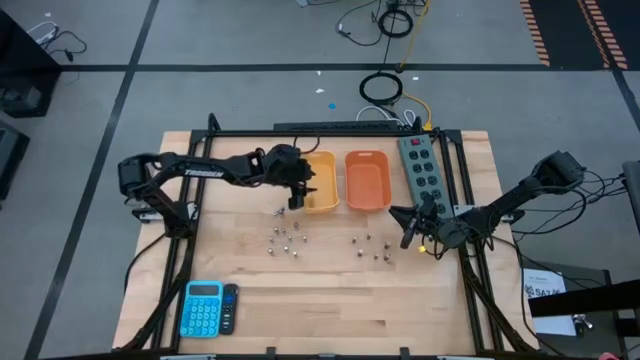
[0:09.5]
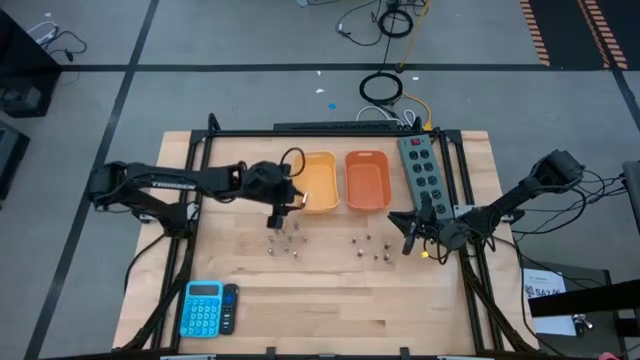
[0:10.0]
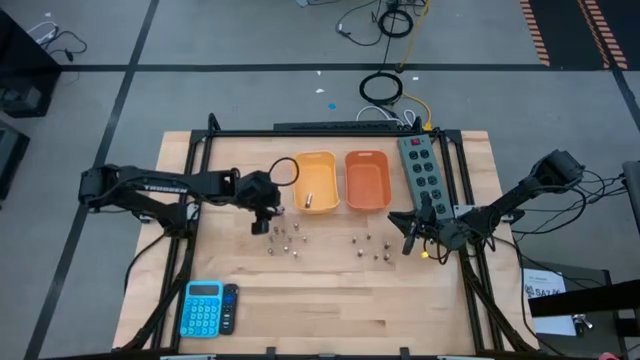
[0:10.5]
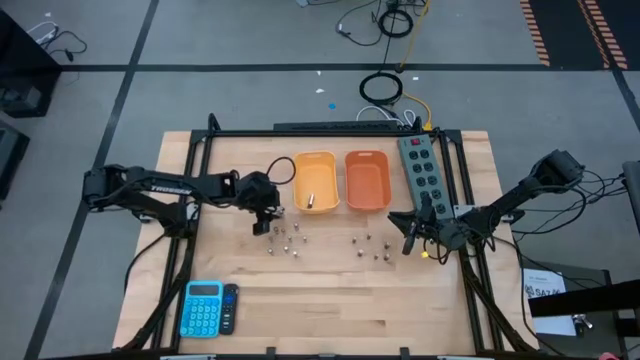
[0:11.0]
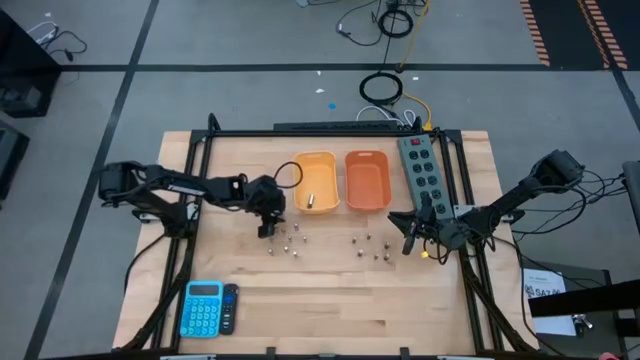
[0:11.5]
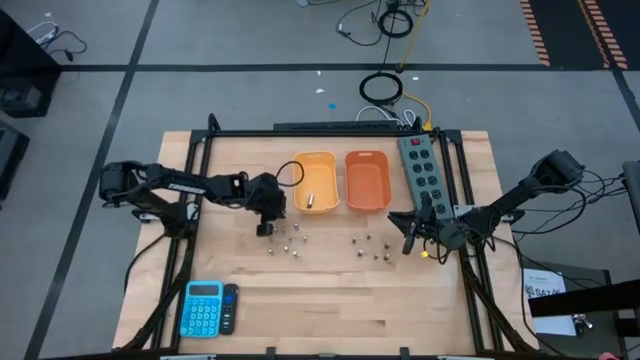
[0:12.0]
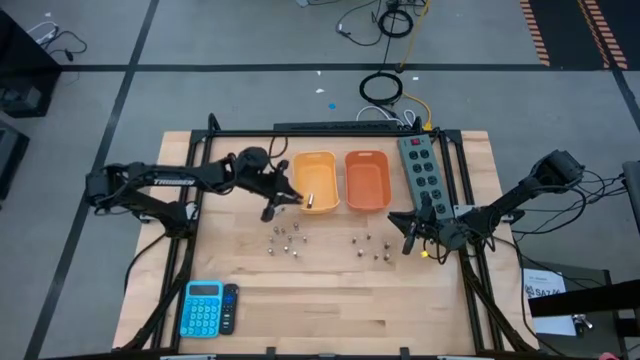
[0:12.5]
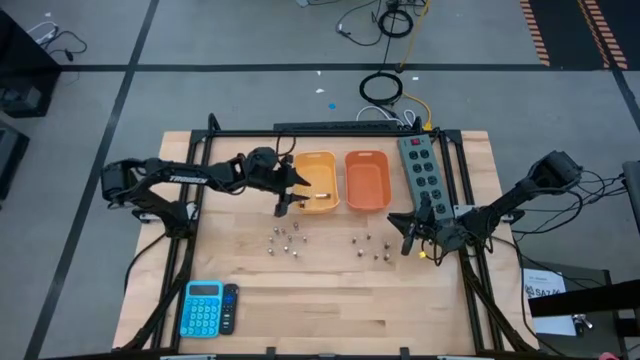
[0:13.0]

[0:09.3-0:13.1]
Task: Sort batteries
Put the silver battery into the yellow bin

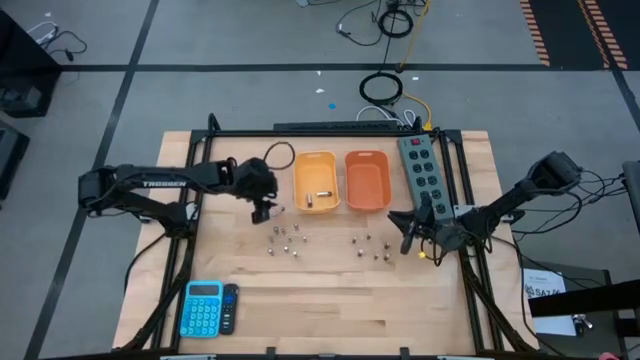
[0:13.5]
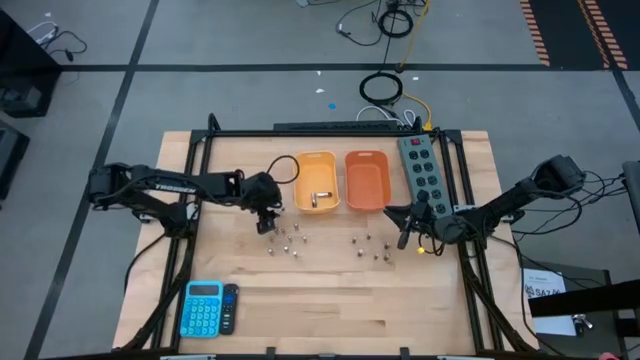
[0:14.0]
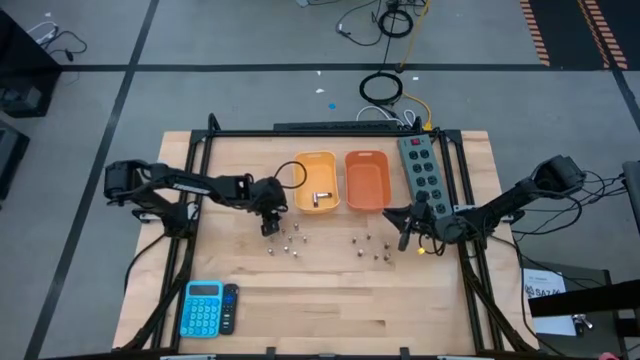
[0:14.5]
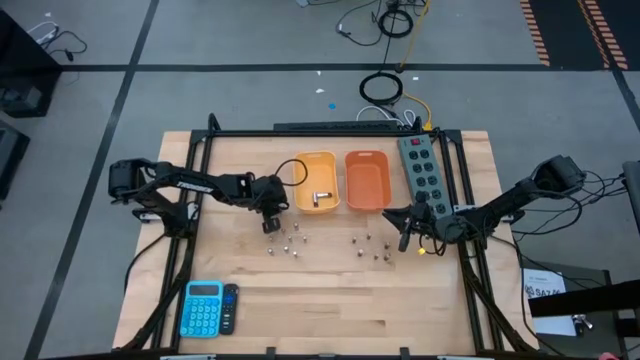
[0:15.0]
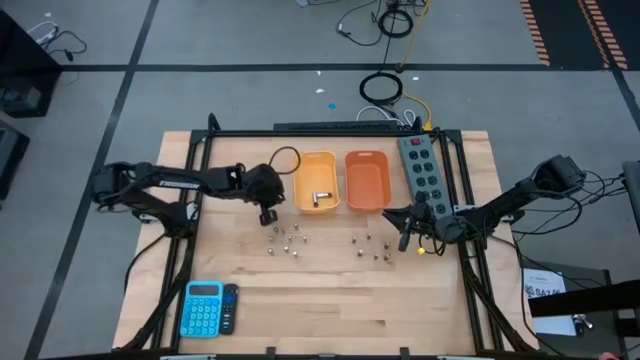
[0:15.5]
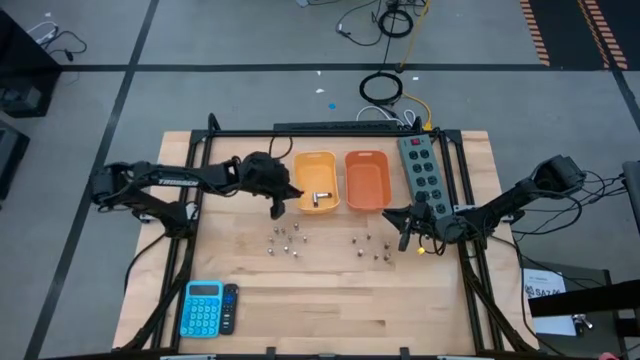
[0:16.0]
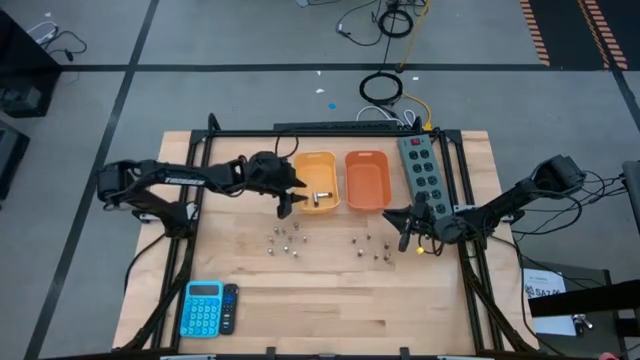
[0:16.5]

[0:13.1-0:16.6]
Put the silver battery into the yellow bin

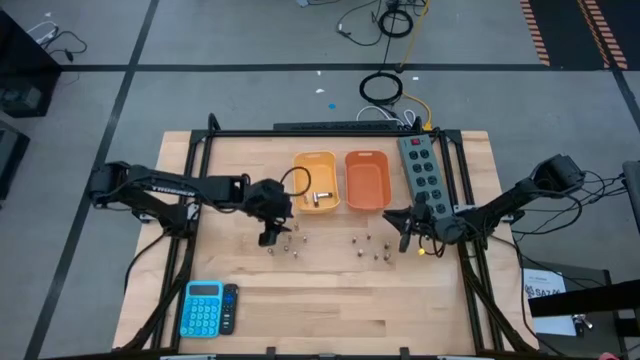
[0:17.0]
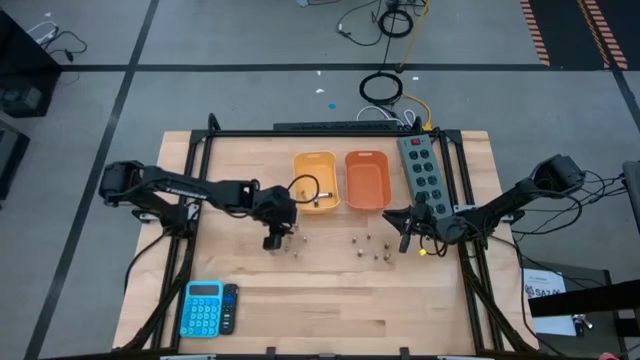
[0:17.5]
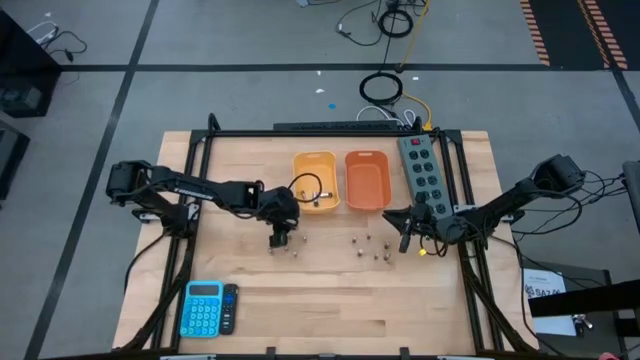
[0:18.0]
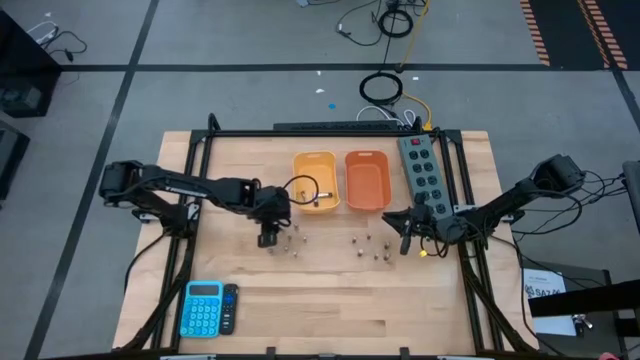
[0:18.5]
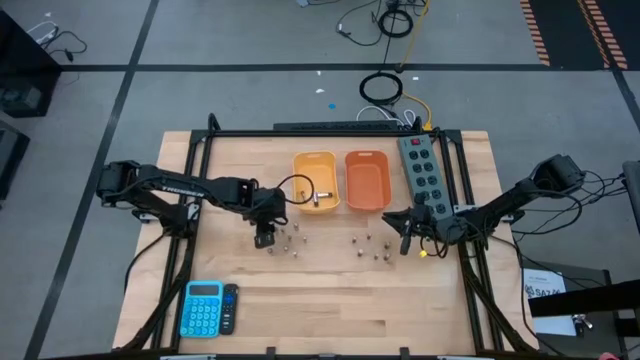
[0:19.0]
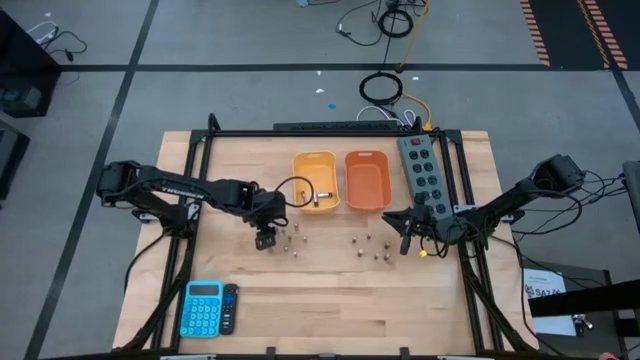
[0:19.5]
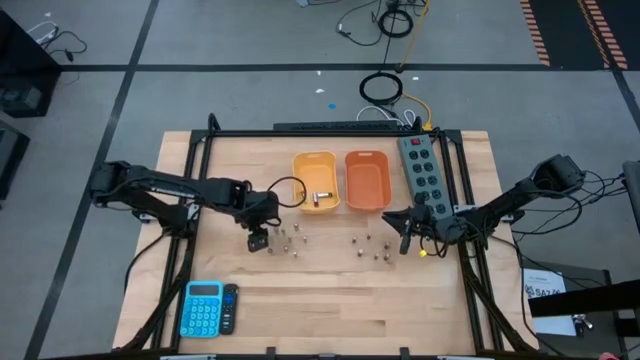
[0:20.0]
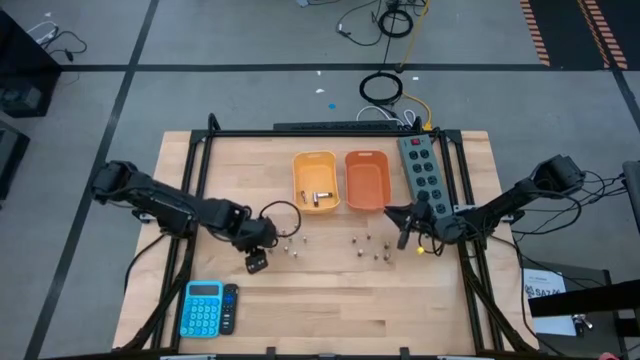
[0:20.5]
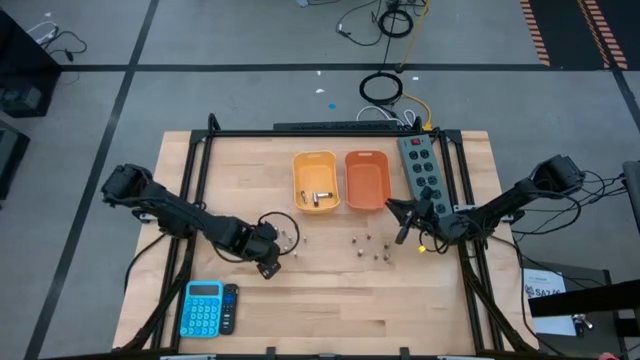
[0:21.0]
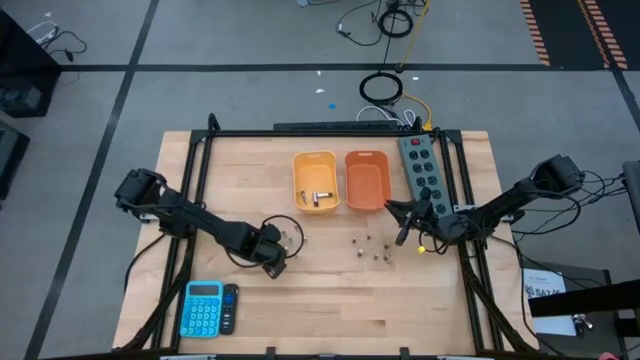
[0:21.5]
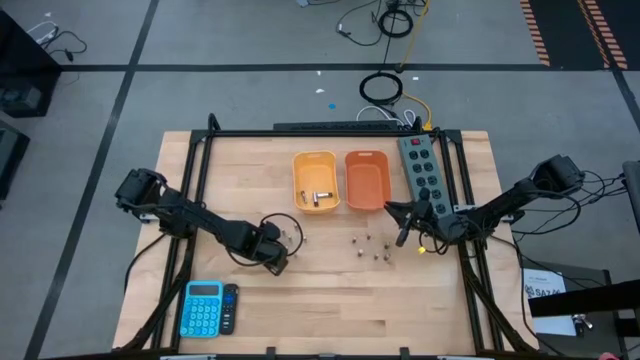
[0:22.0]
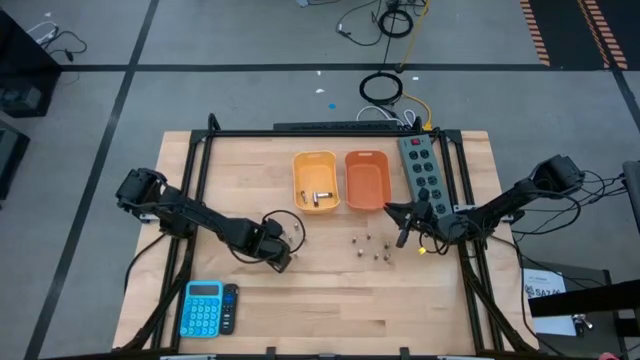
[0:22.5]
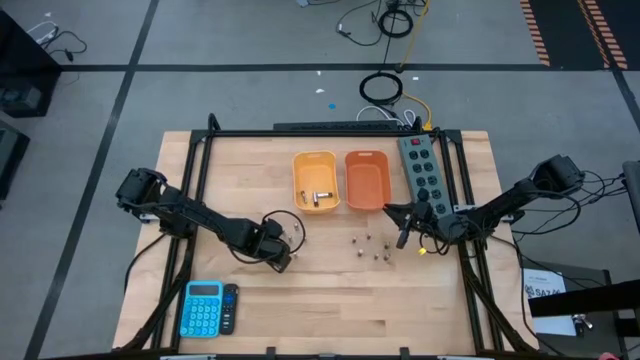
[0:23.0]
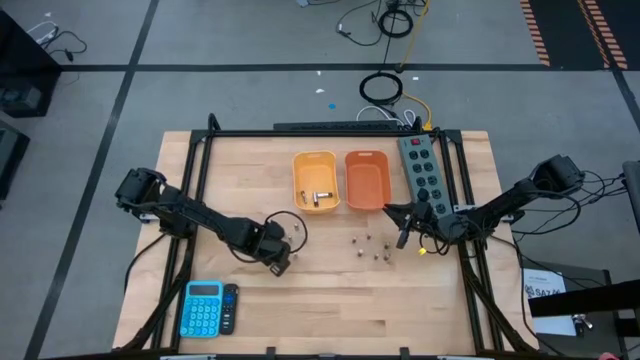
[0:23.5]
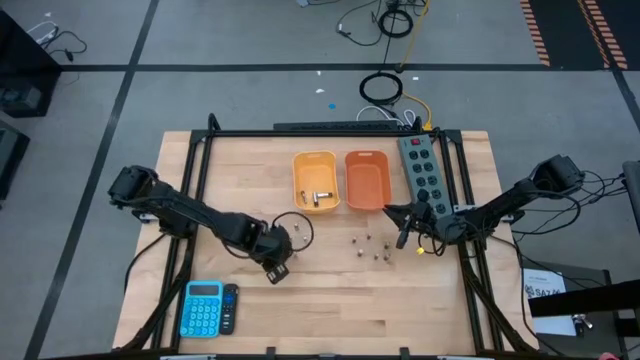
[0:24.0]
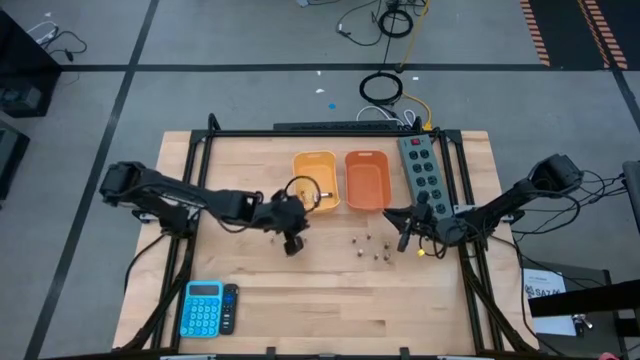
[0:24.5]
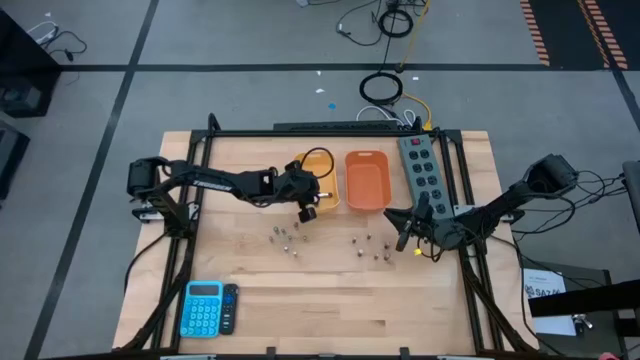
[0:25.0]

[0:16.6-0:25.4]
Put the silver battery into the yellow bin

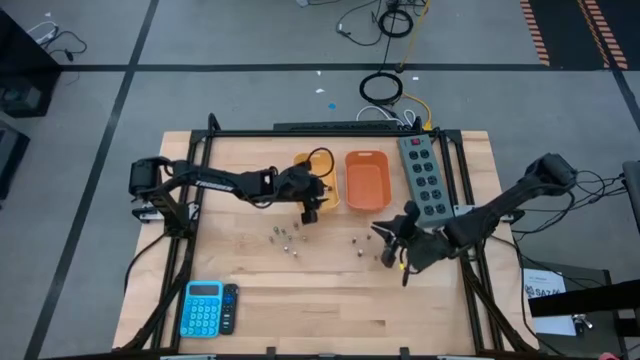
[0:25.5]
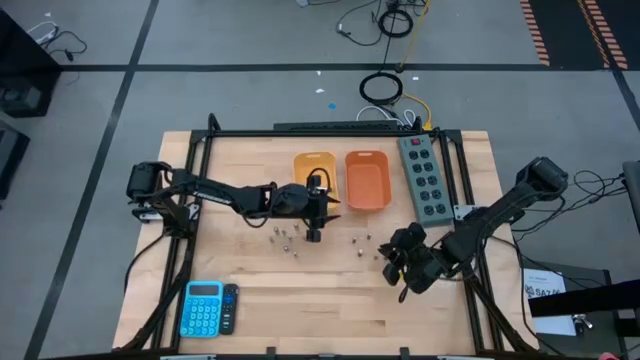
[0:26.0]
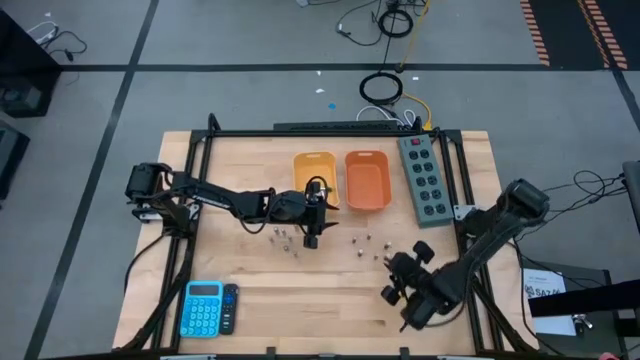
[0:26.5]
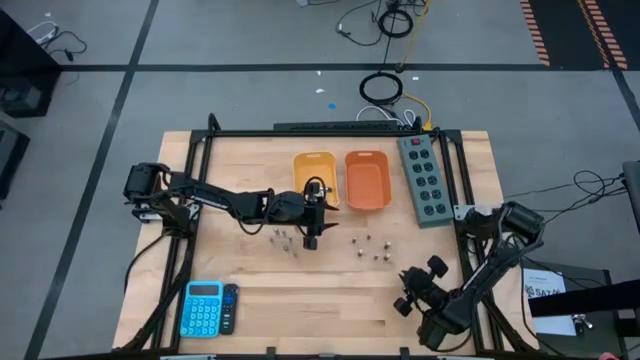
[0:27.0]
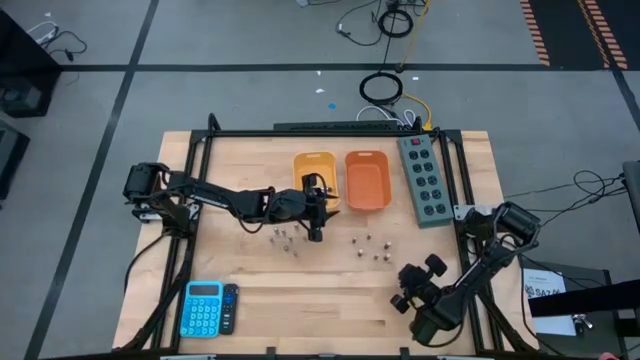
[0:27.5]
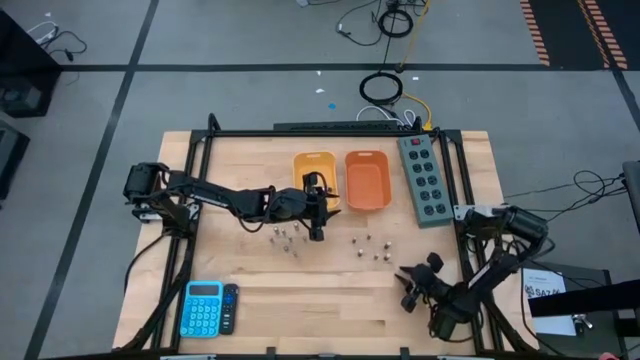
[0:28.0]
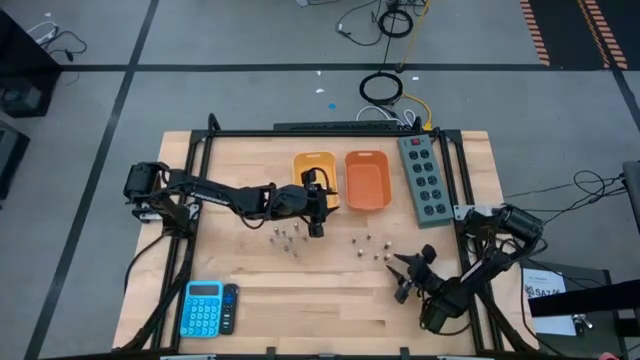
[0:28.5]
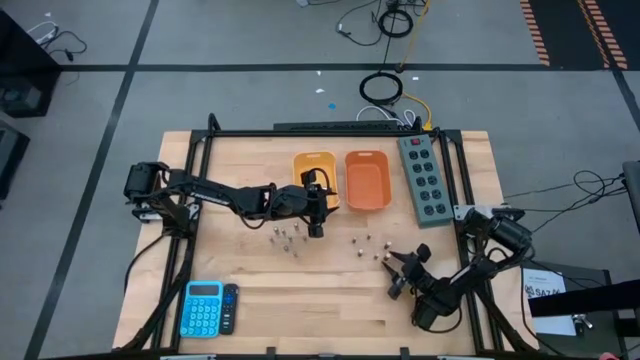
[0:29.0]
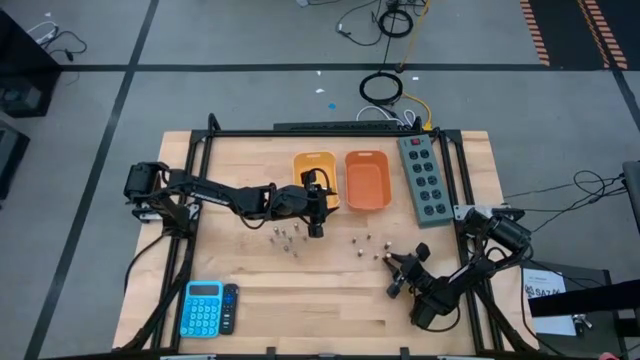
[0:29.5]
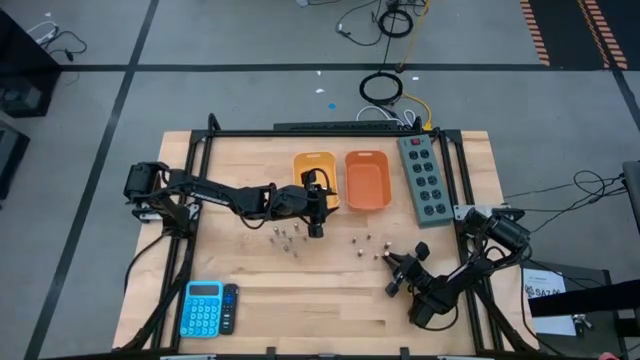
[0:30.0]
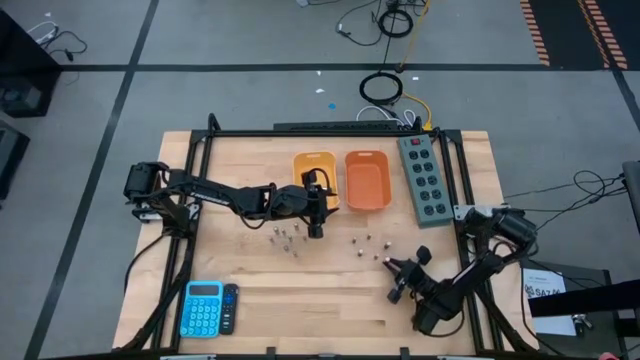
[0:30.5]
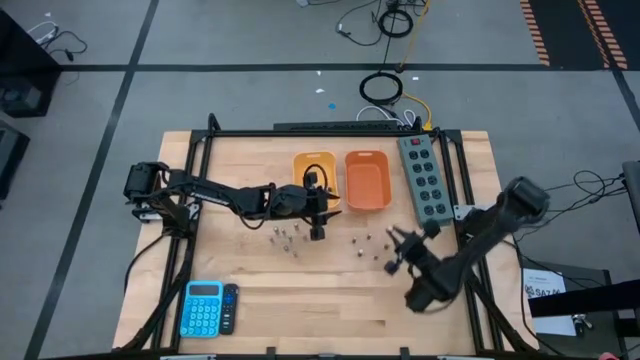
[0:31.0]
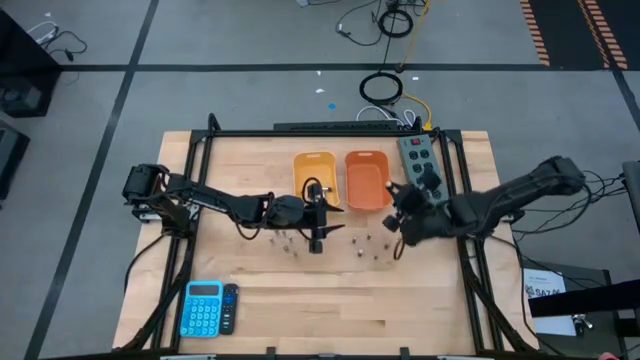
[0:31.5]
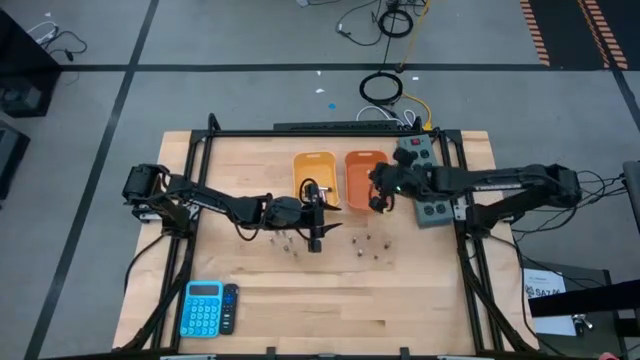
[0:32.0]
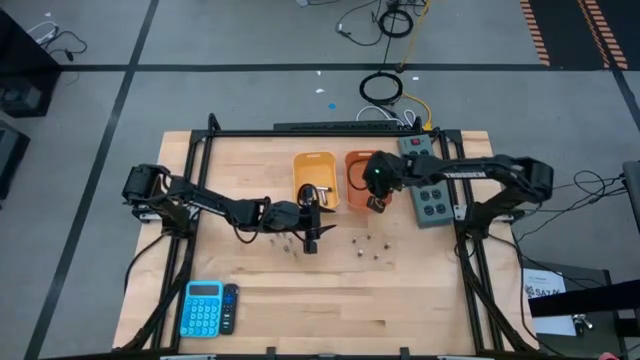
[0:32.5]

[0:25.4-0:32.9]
Put the copper battery into the orange bin
